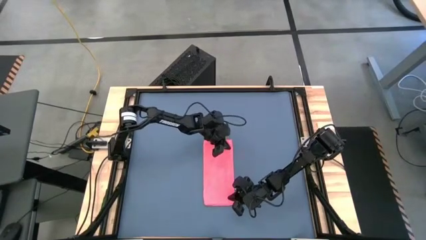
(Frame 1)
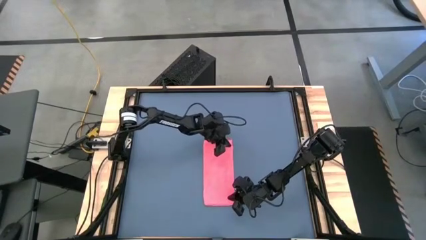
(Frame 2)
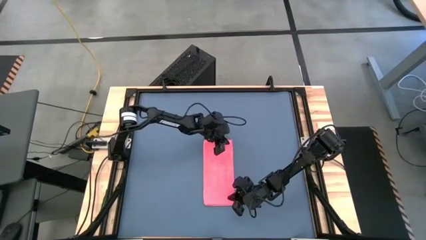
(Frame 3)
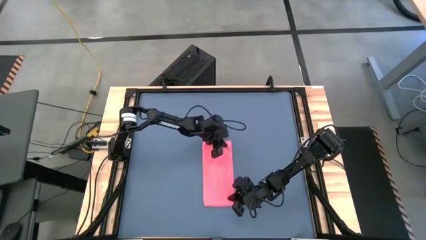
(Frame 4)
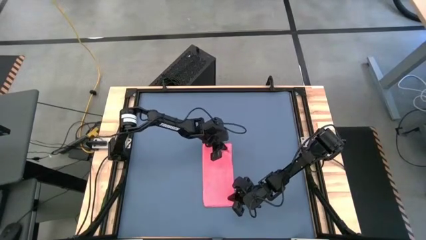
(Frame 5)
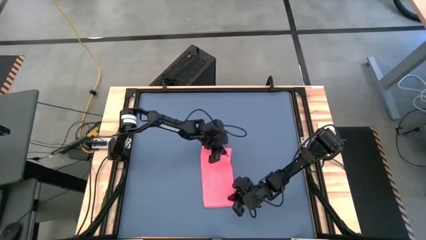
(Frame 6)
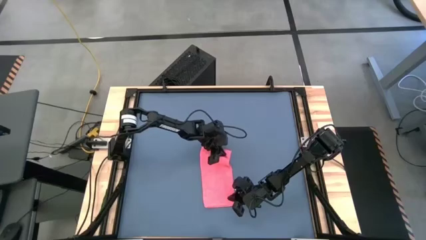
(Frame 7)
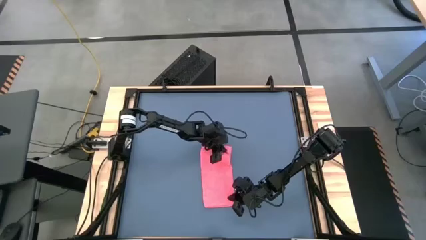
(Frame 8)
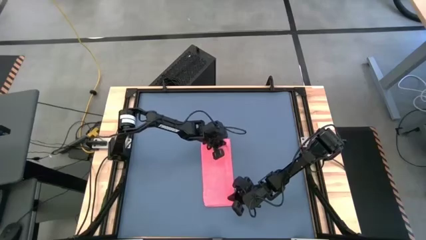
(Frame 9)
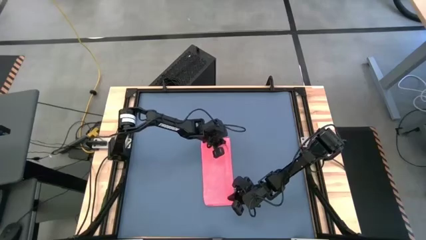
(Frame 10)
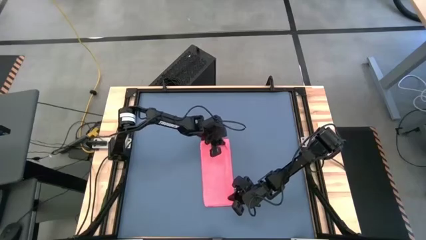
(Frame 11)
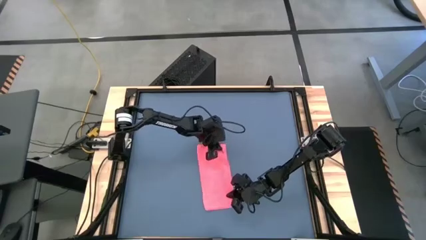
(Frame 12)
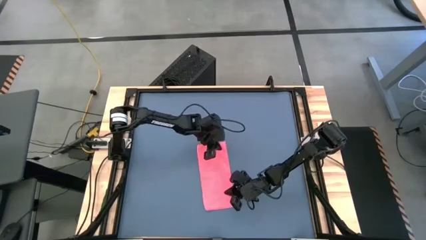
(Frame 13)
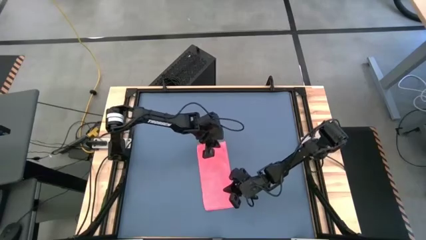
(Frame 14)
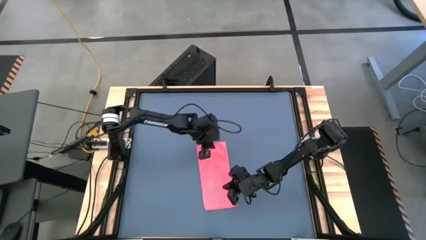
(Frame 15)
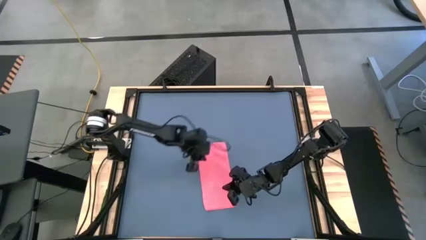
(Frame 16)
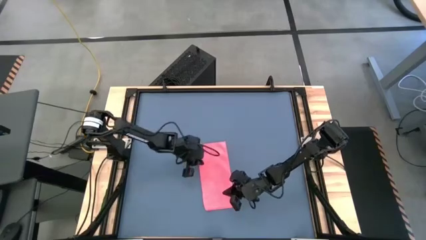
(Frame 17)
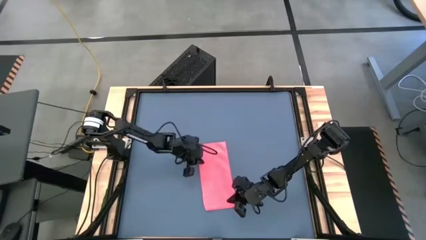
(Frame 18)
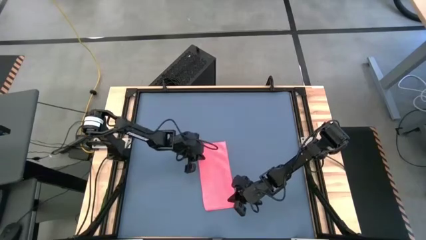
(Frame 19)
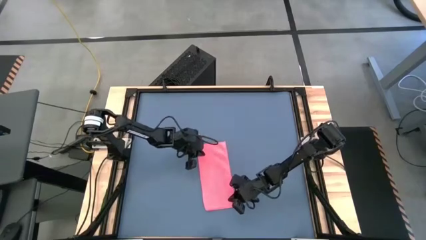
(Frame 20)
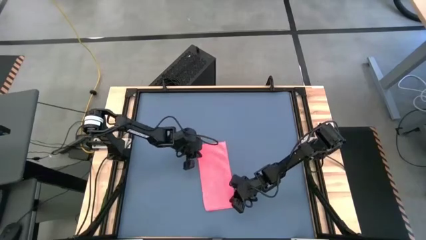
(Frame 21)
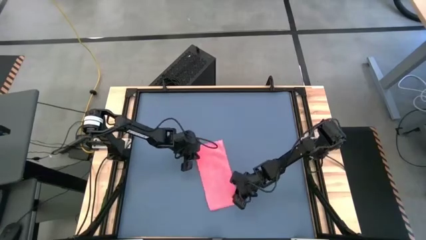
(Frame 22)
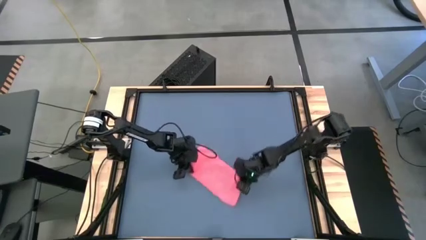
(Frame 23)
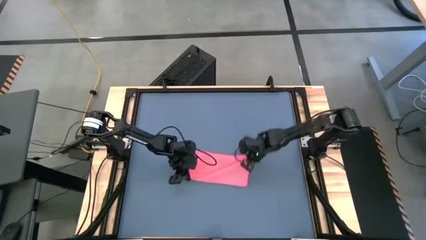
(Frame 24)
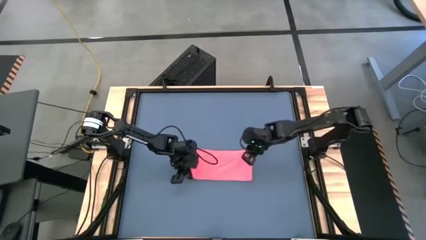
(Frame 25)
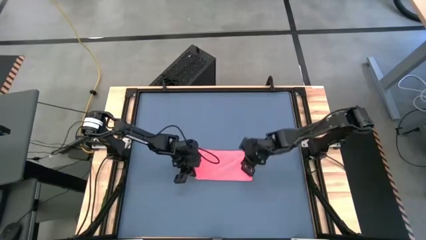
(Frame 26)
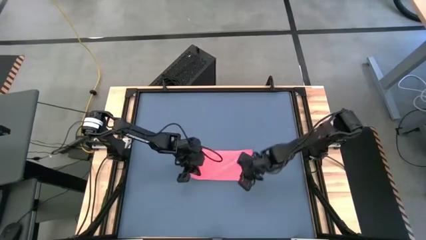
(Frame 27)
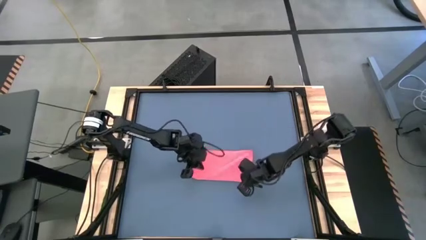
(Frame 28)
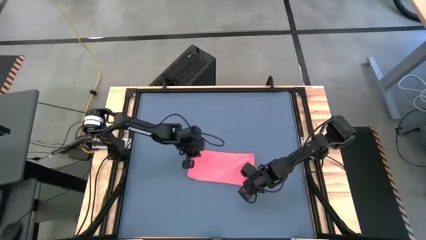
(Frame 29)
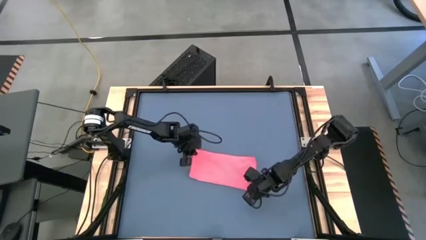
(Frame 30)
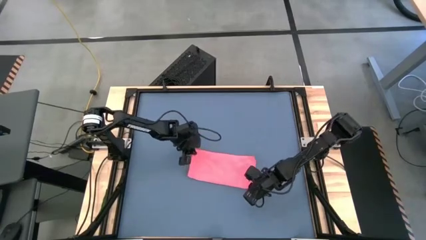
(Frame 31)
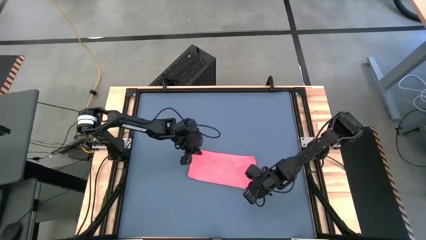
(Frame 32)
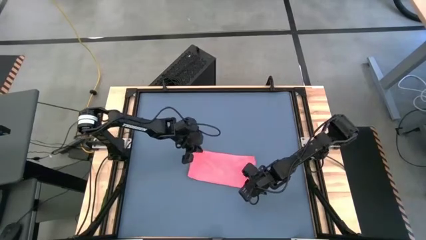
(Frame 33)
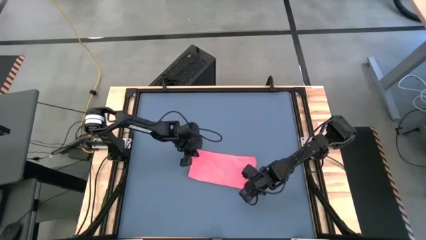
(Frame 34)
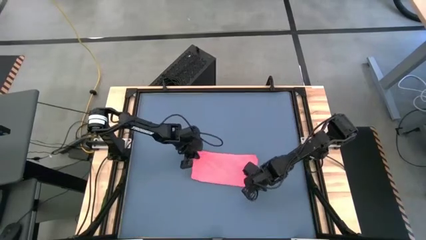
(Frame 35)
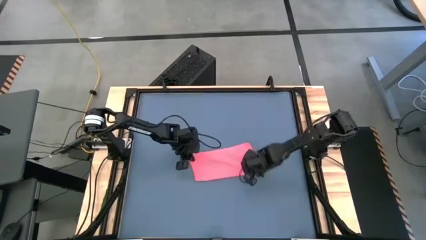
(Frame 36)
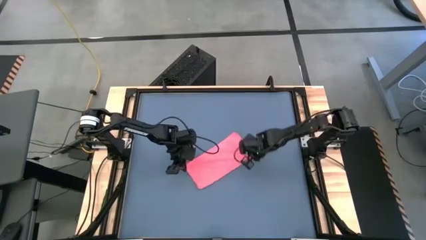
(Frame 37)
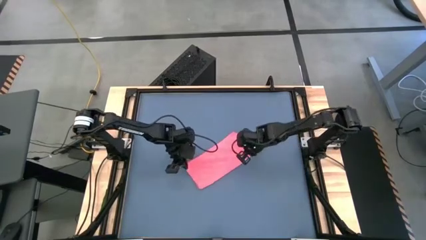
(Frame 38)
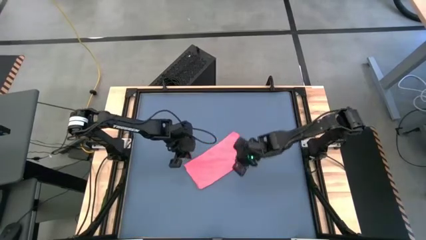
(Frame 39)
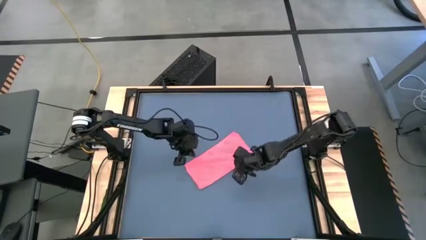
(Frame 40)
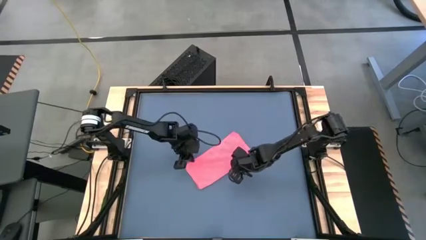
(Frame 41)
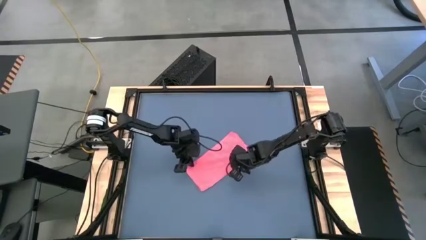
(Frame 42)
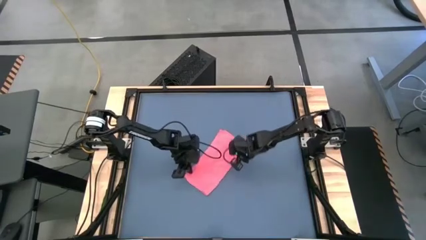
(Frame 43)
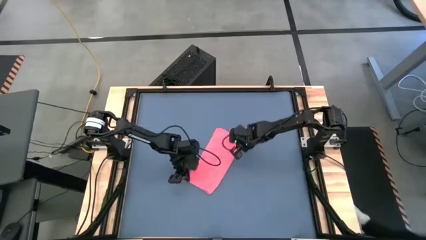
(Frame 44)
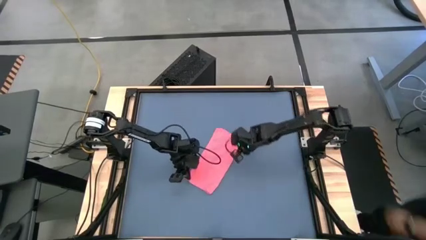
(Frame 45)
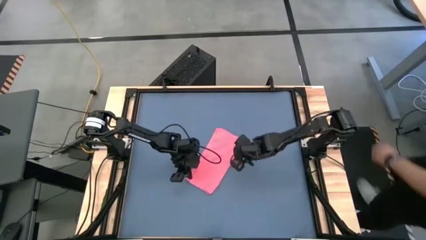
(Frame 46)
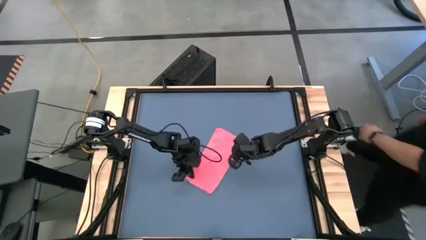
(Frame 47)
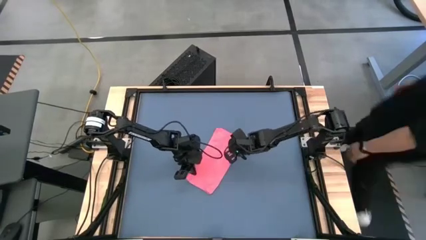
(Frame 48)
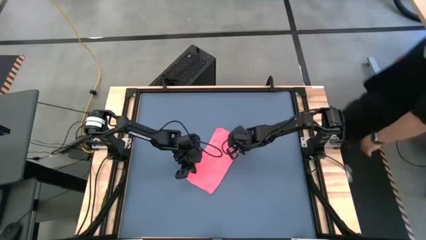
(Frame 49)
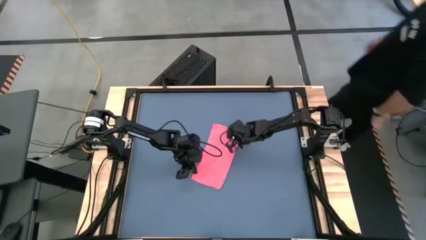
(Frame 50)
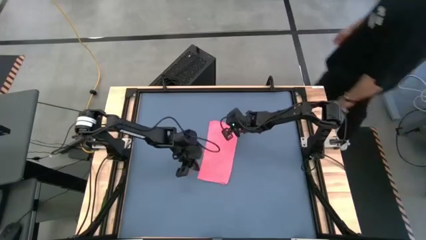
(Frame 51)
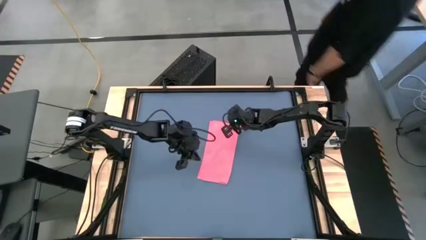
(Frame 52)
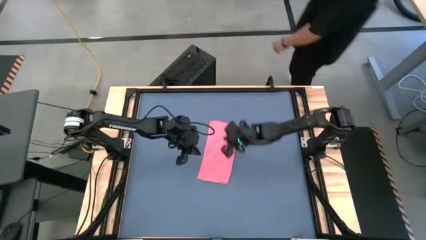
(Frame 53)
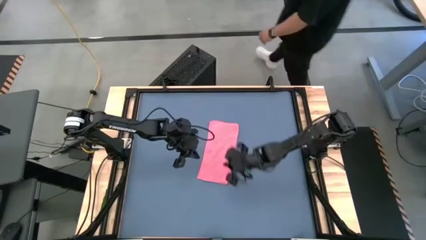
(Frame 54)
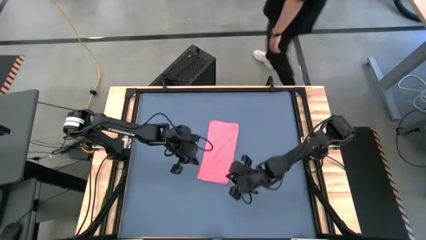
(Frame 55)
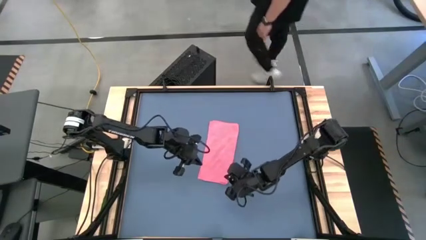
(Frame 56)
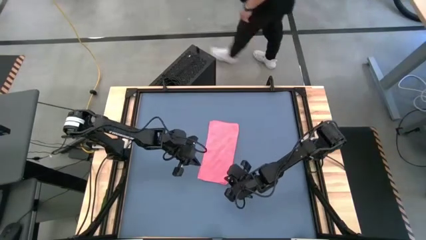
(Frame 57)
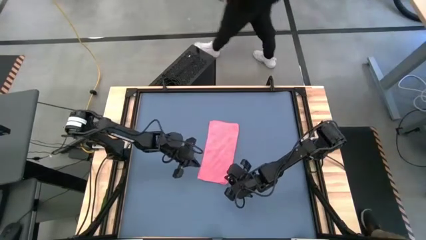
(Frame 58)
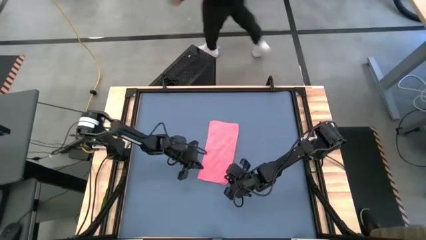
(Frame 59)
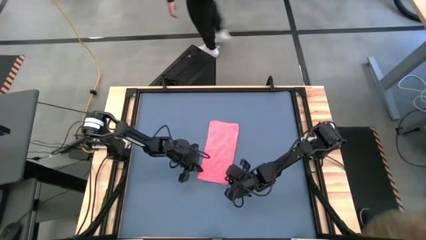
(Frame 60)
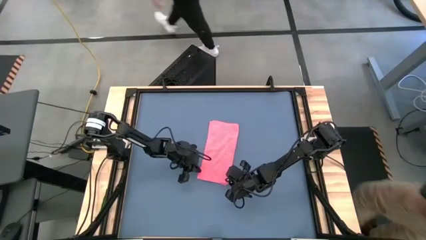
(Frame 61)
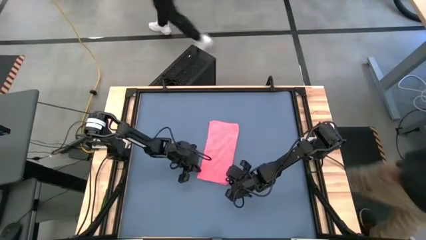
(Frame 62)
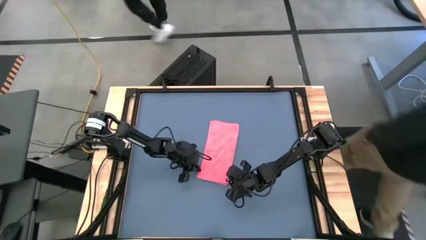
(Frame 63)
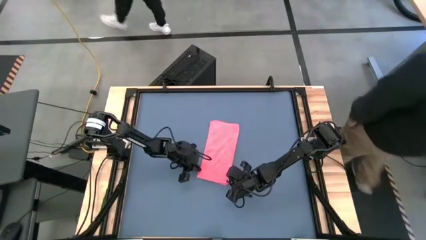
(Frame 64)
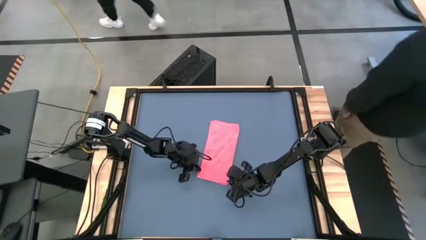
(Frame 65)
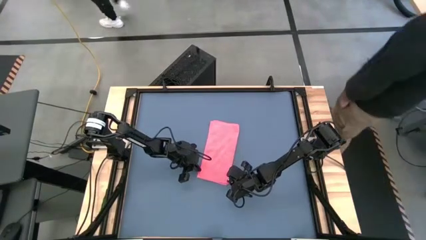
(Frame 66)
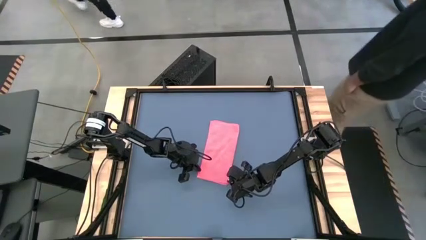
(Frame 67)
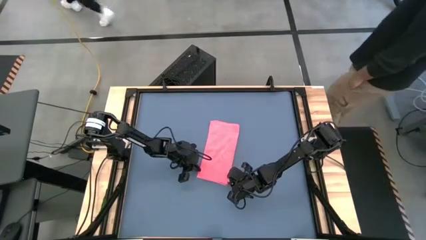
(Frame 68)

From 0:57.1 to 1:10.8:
Task: Roll towel
Fold the pink towel

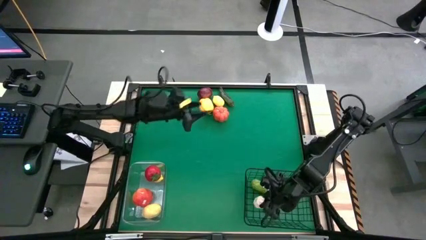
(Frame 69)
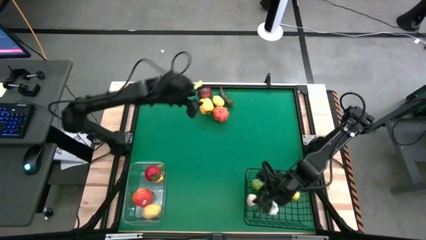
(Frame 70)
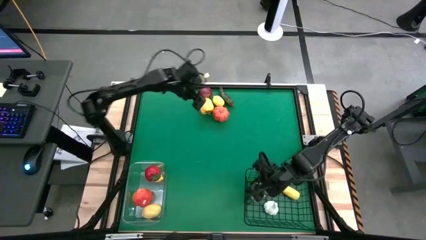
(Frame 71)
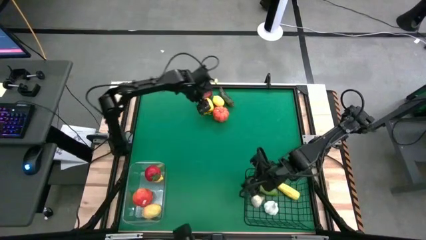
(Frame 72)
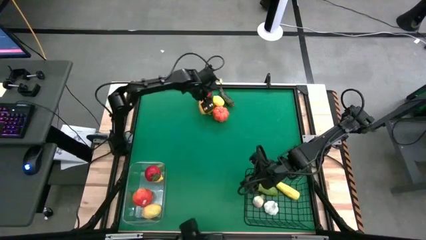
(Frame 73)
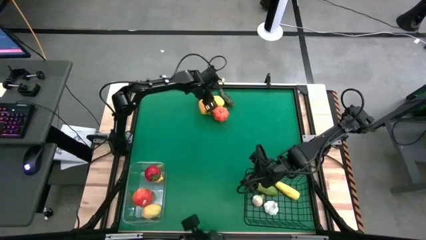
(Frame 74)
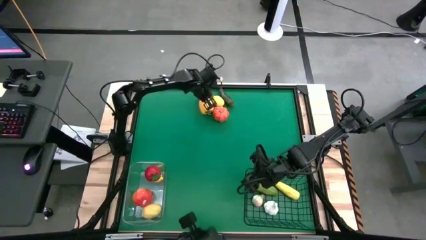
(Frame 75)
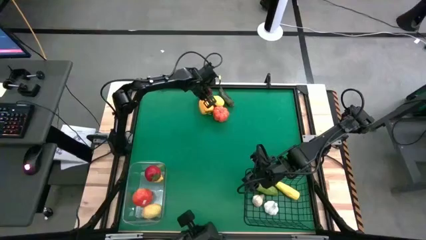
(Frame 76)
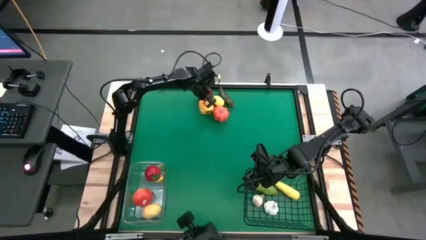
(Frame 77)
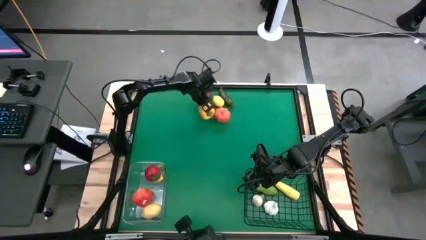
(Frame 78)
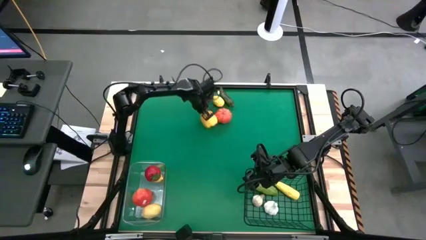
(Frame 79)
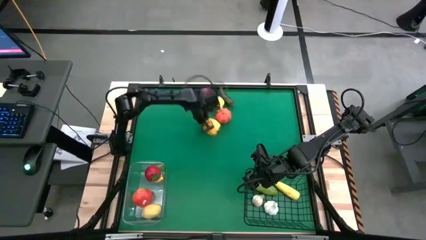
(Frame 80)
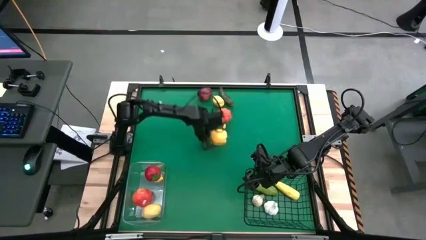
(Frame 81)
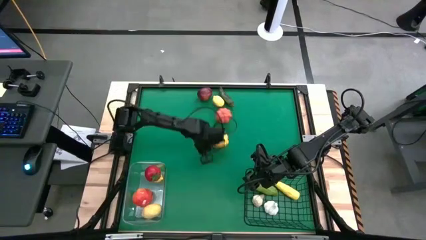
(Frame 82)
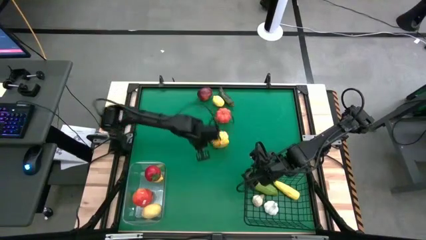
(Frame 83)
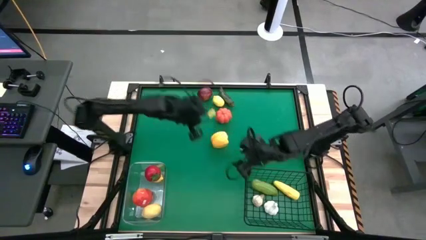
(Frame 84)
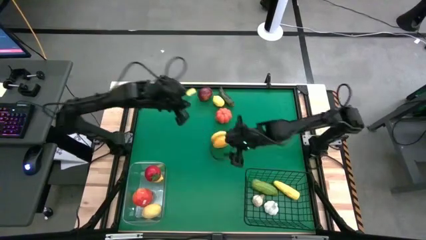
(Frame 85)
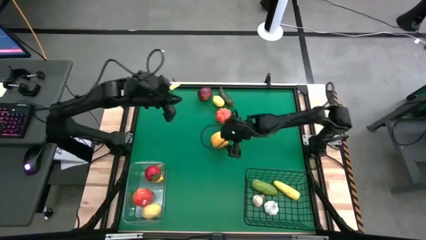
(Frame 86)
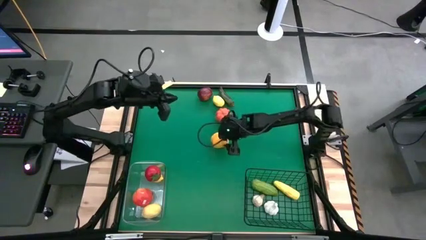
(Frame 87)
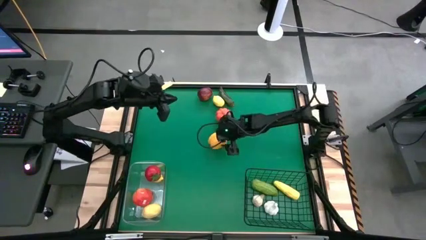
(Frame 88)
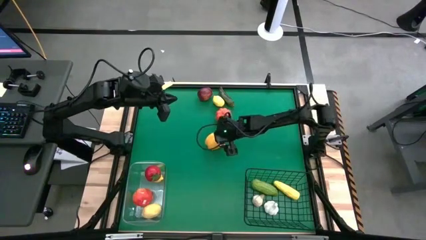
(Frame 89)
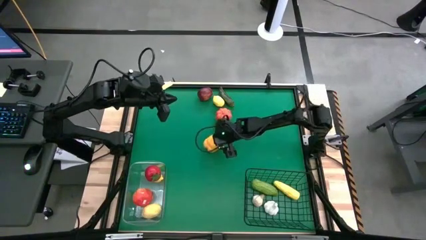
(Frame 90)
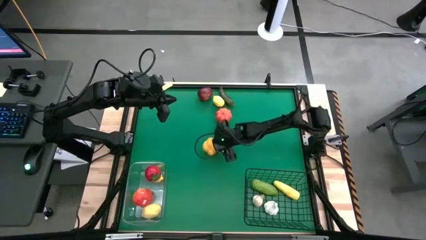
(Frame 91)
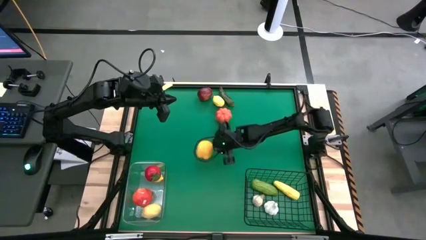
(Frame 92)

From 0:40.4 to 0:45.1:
Task: Sort produce into baskets
Put the yellow bell pepper into the wire basket
